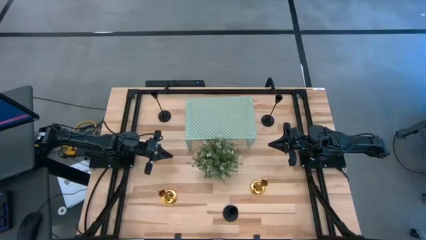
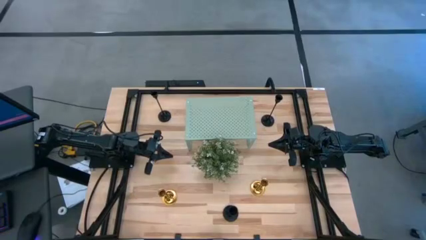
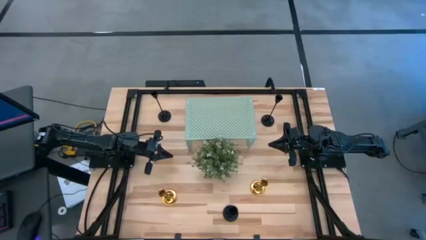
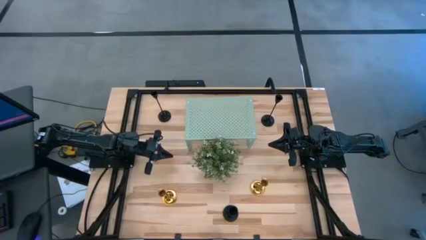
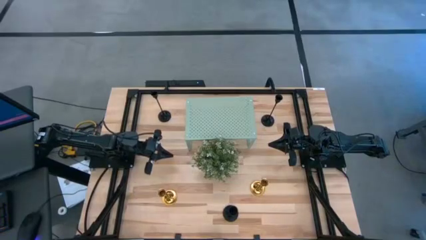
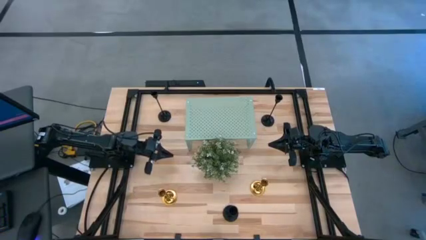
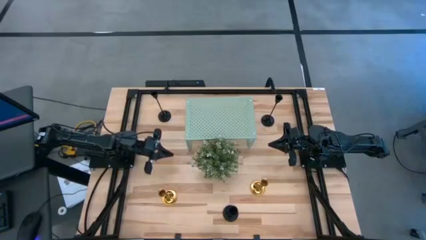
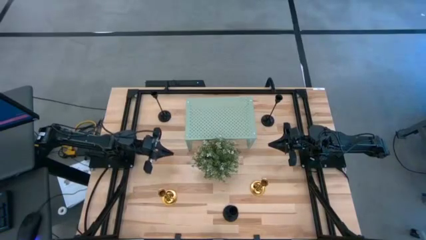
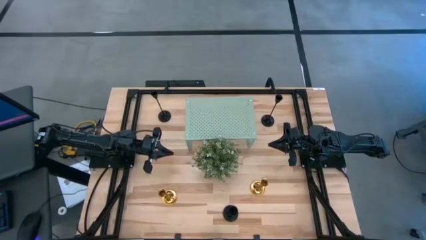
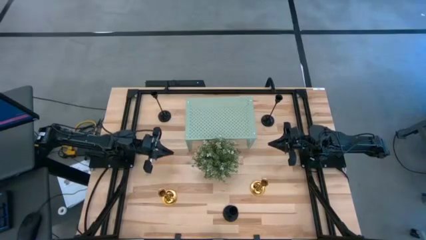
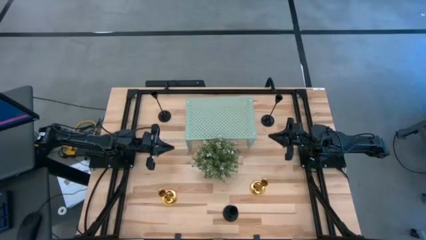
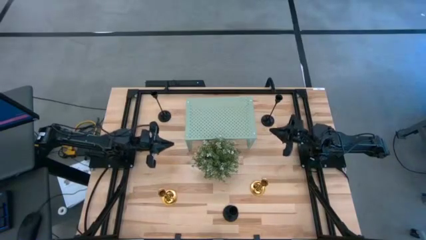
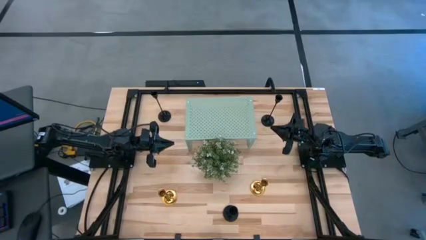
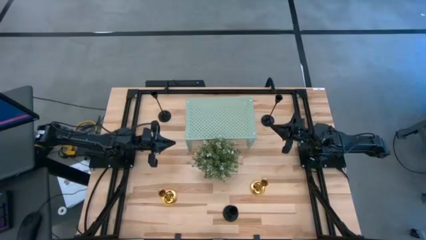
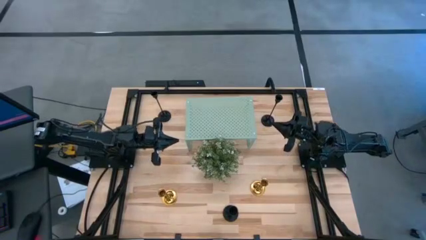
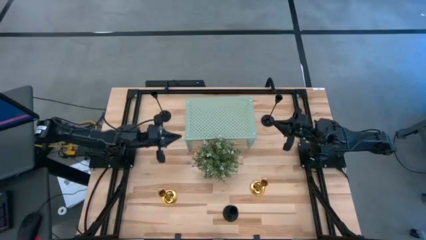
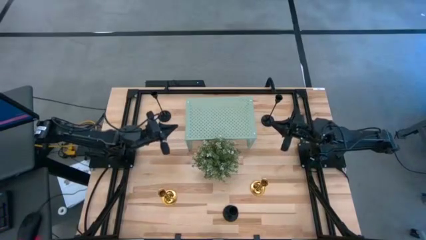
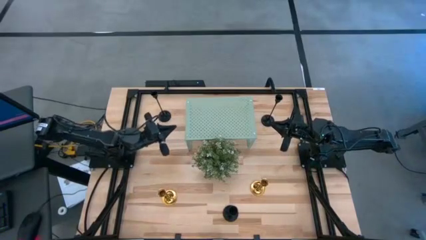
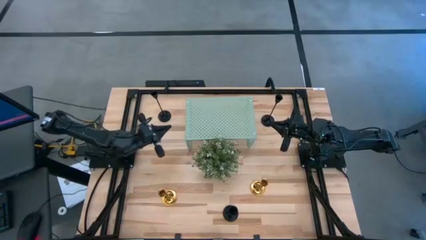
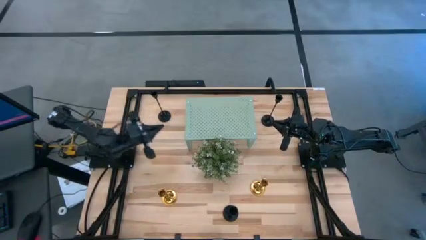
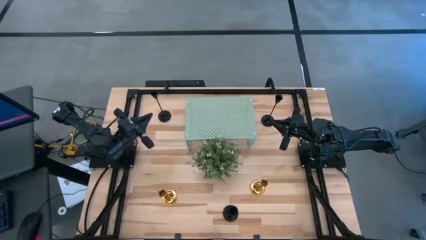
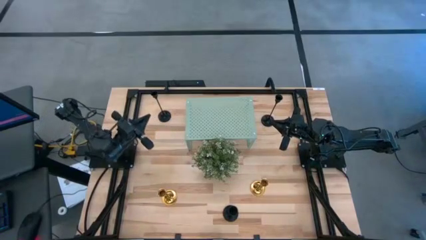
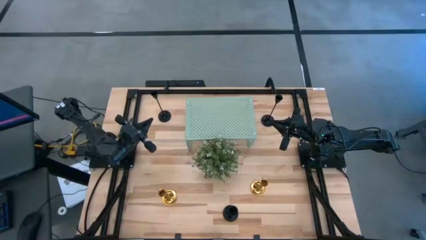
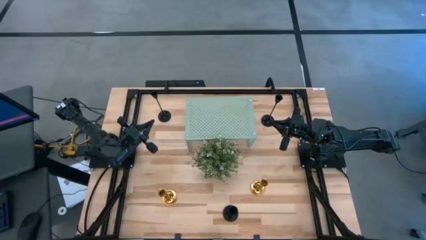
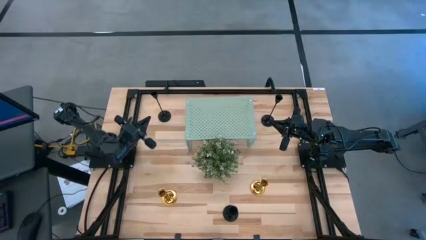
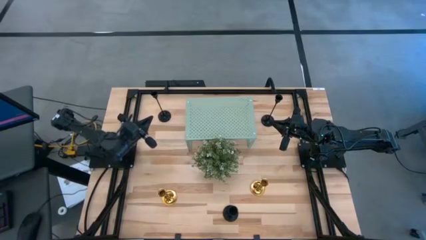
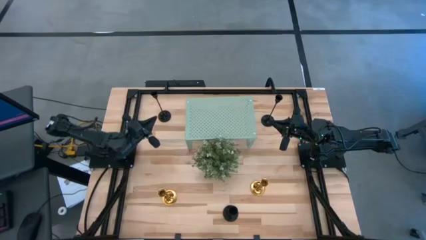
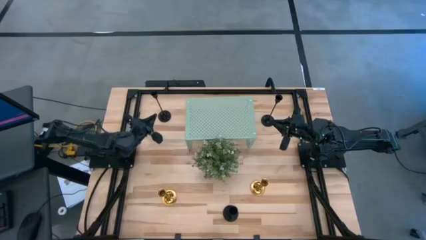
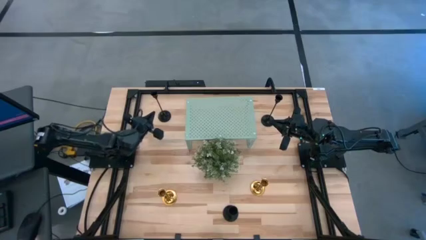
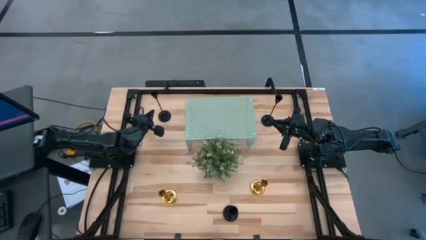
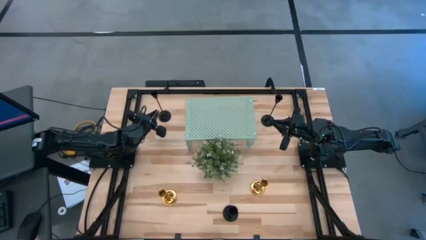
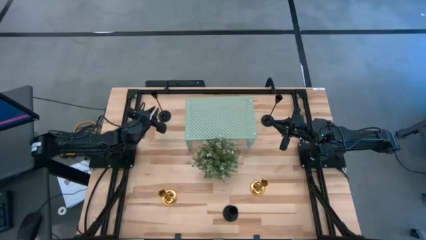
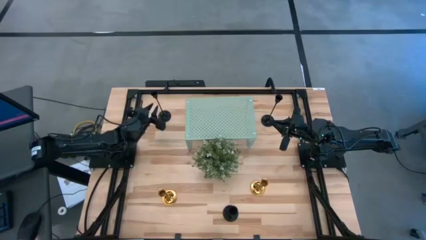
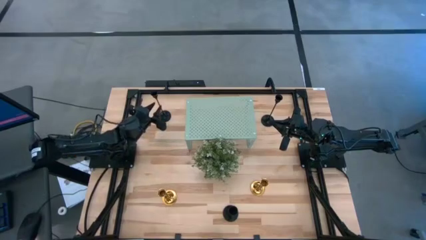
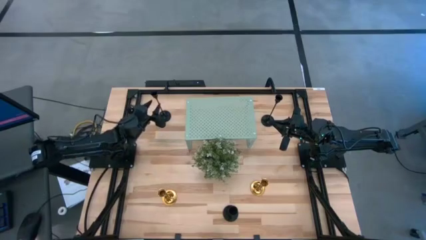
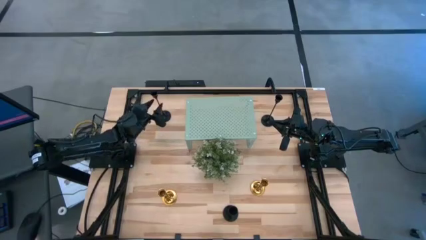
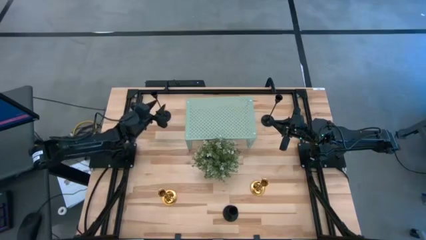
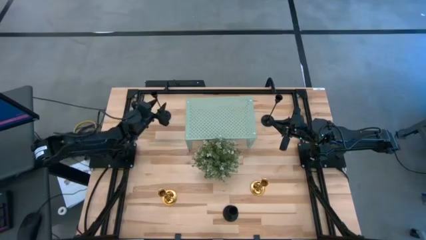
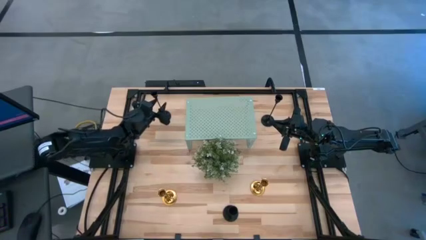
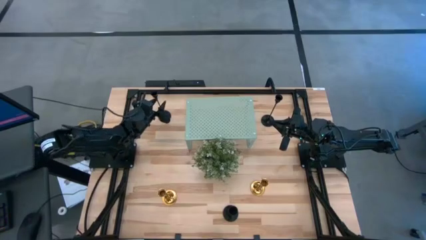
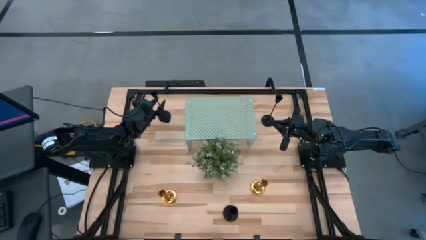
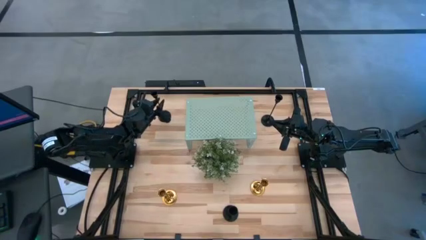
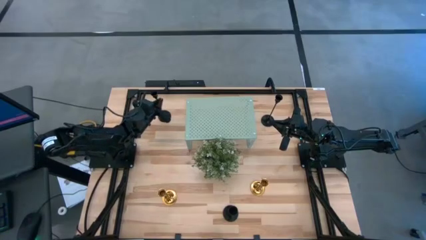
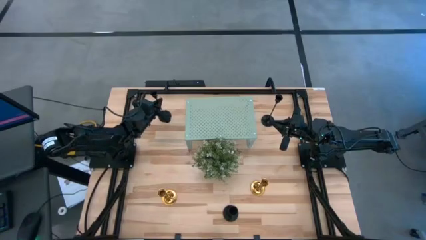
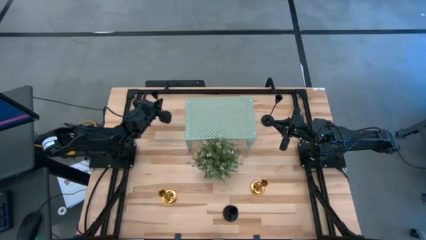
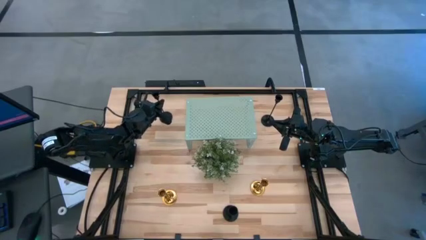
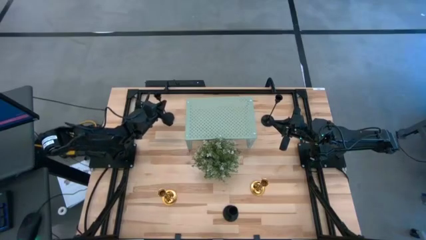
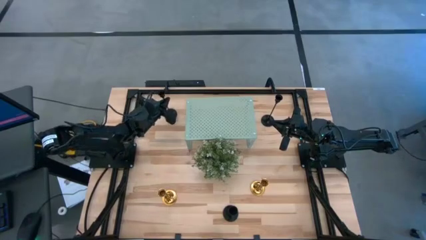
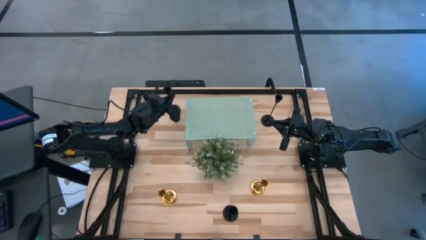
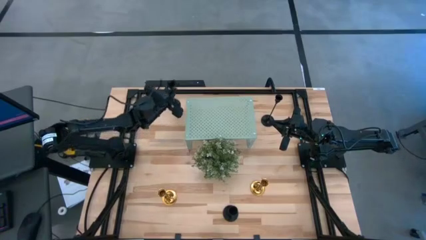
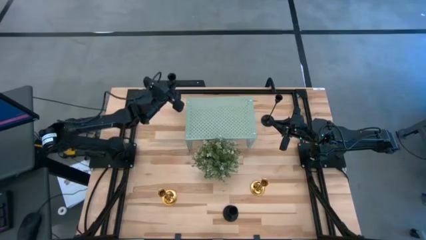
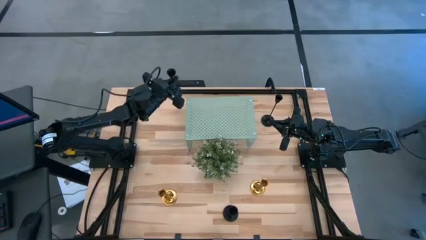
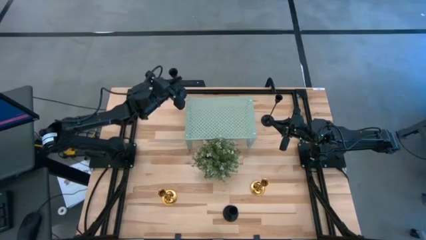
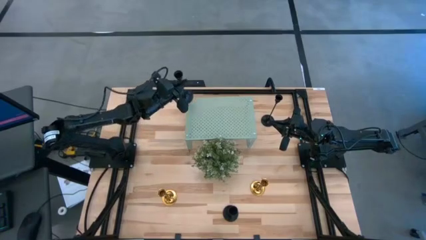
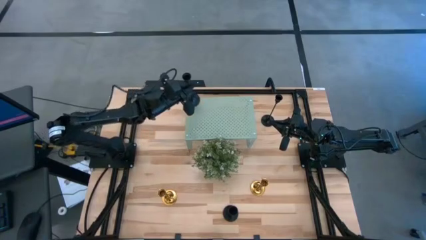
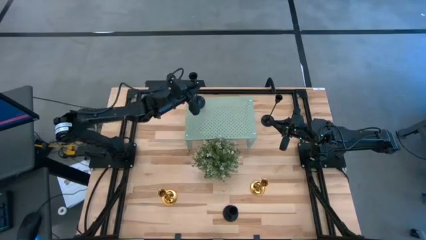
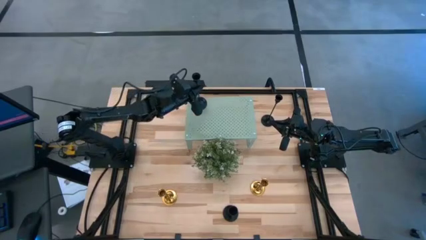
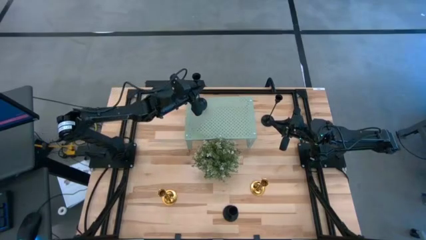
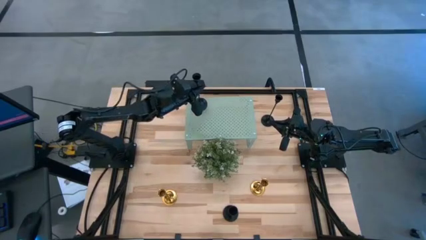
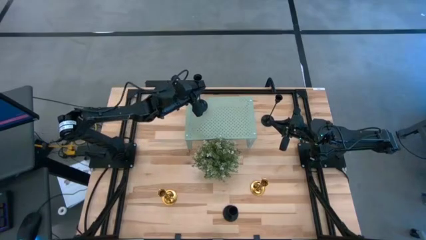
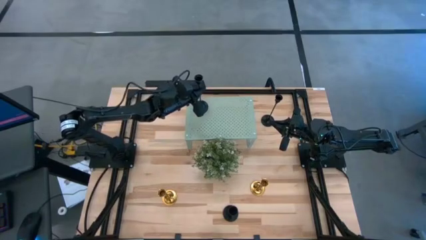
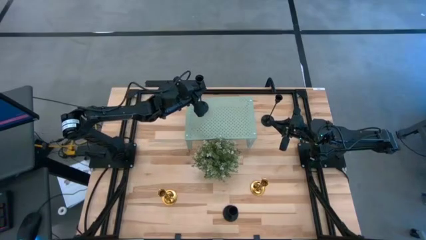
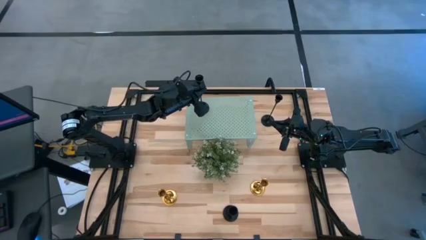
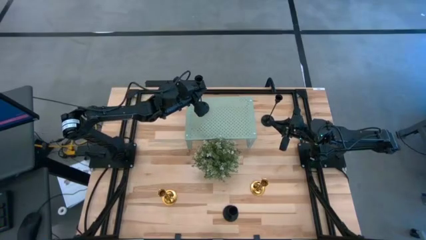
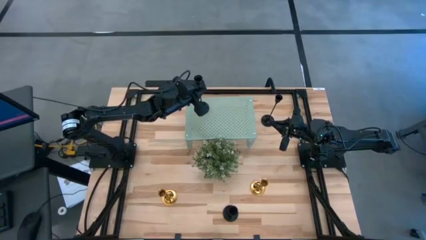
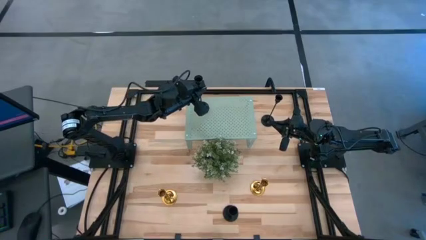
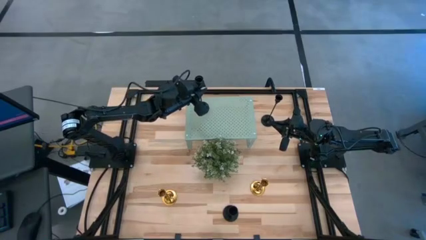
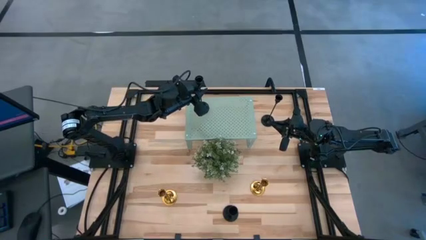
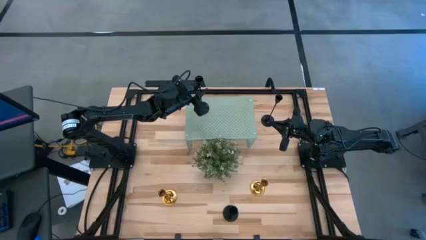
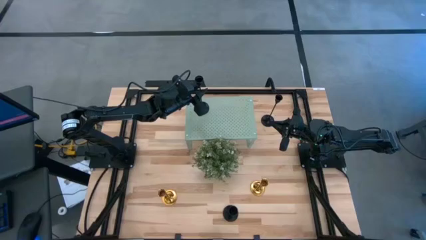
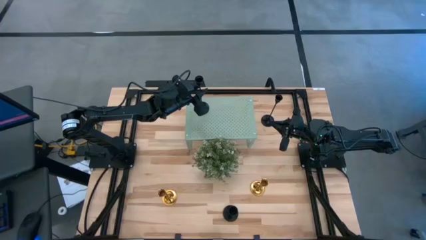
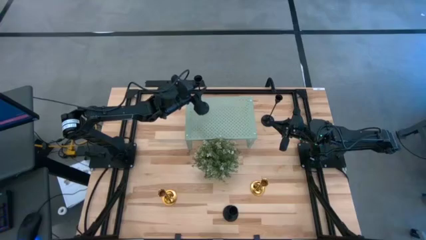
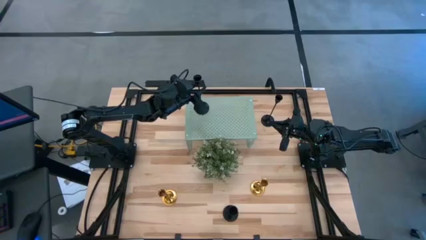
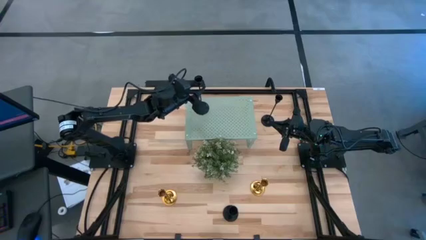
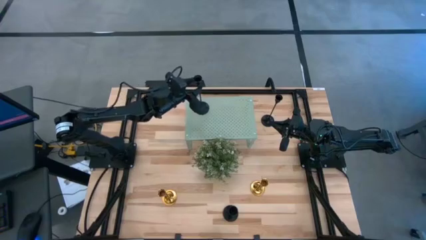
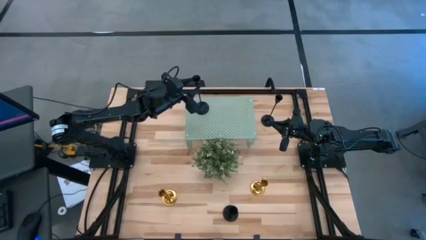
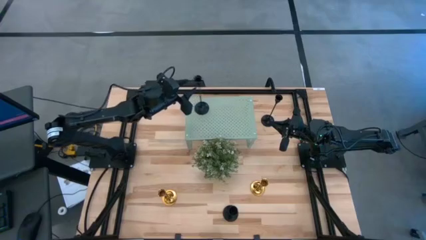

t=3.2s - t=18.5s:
Task: Pick & Place candle stick holders
Put the top left black candle holder on the shelf
